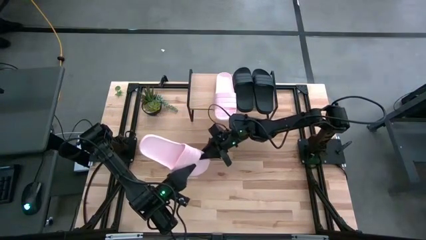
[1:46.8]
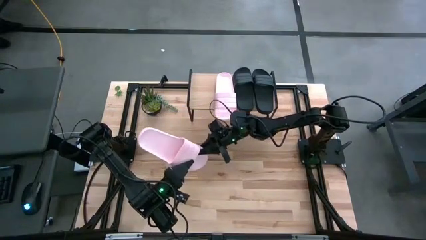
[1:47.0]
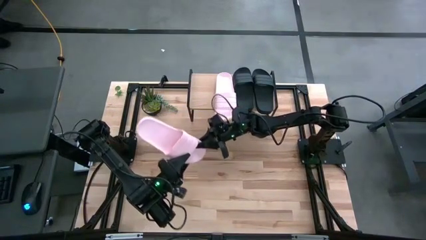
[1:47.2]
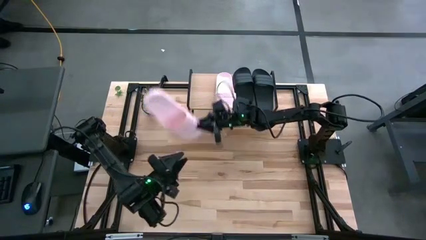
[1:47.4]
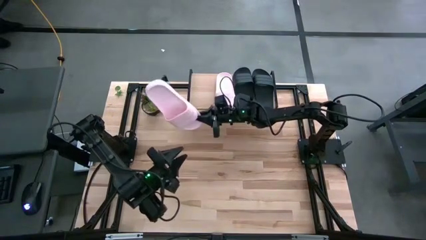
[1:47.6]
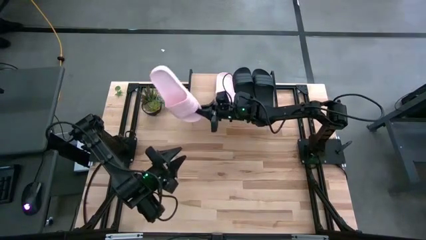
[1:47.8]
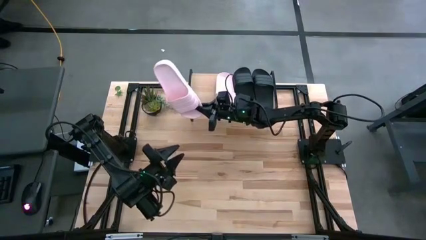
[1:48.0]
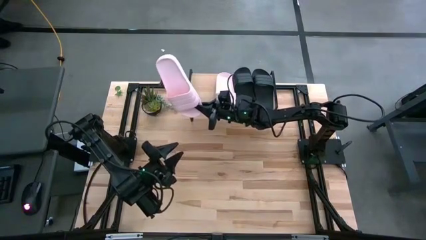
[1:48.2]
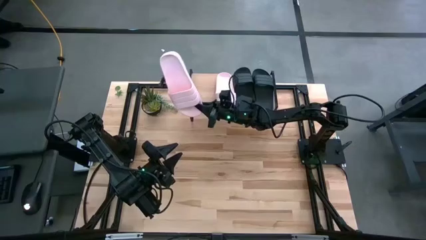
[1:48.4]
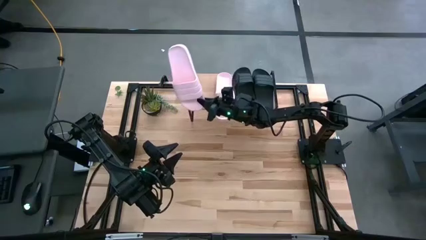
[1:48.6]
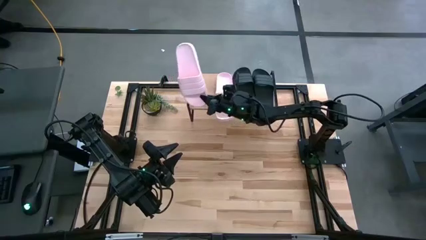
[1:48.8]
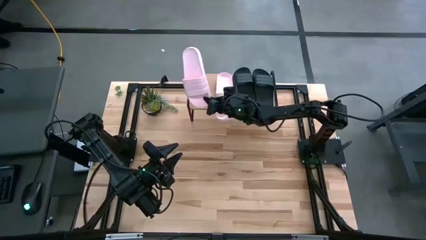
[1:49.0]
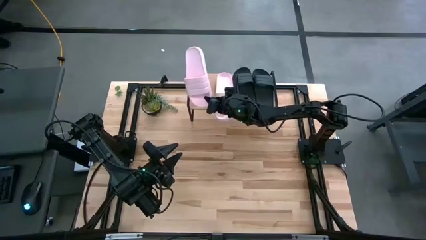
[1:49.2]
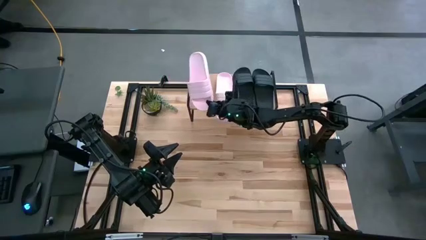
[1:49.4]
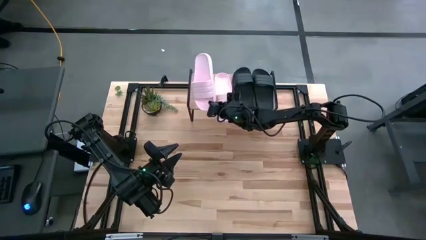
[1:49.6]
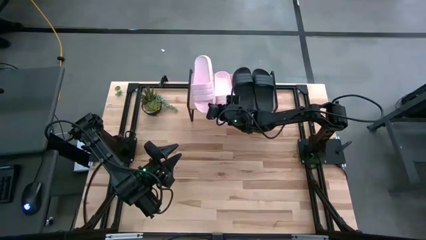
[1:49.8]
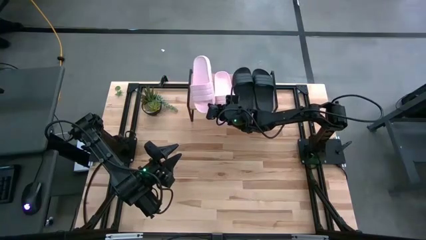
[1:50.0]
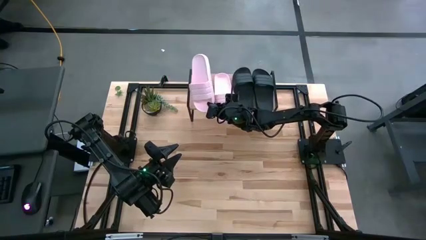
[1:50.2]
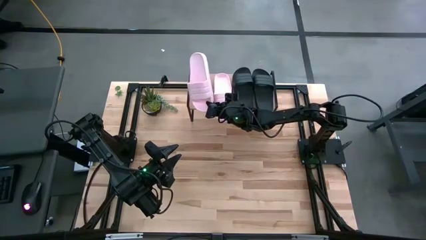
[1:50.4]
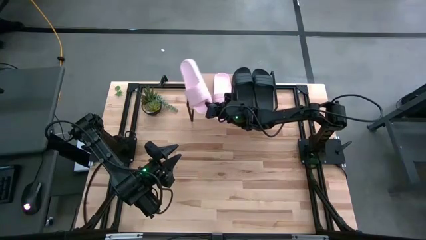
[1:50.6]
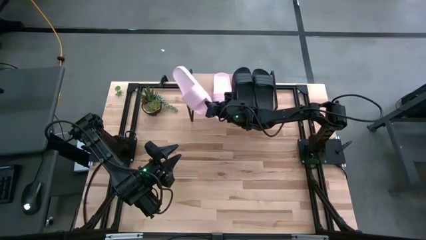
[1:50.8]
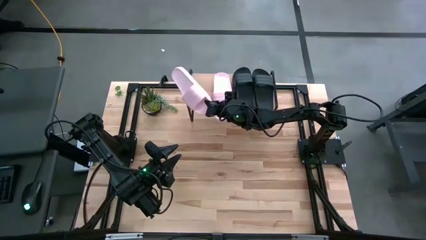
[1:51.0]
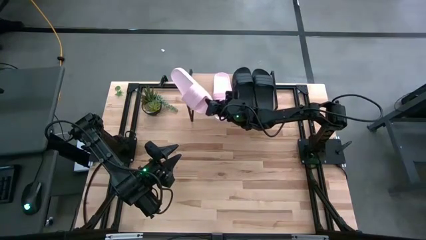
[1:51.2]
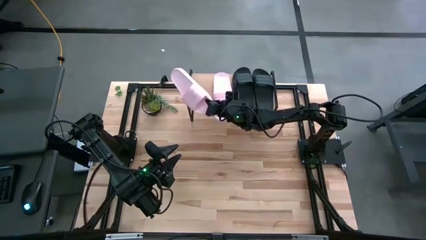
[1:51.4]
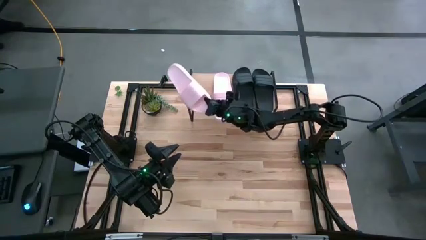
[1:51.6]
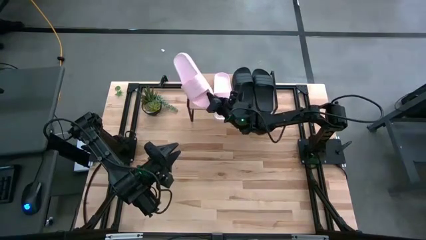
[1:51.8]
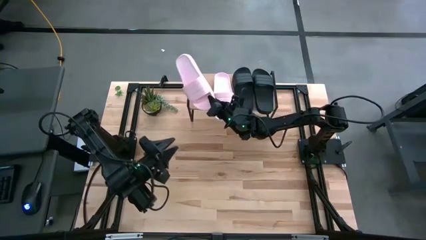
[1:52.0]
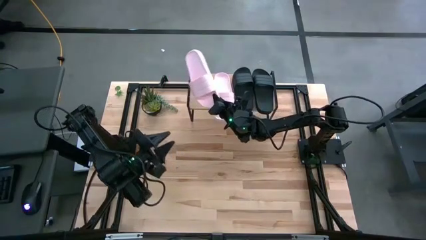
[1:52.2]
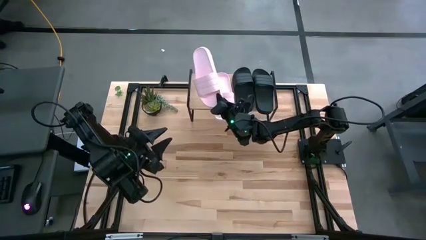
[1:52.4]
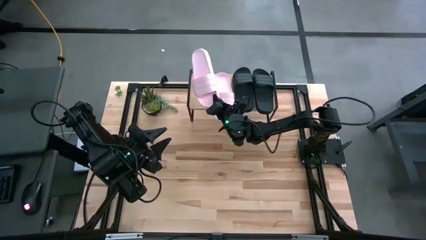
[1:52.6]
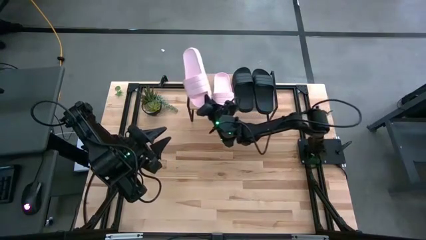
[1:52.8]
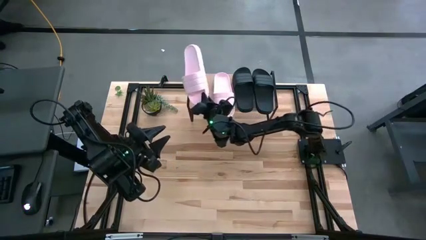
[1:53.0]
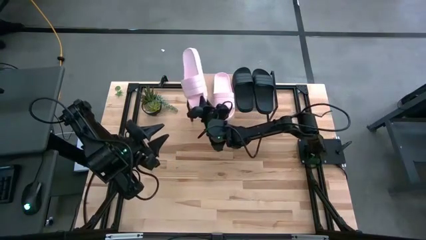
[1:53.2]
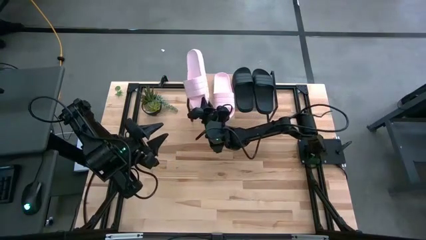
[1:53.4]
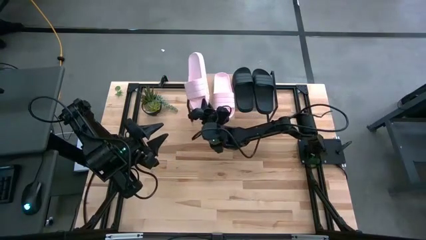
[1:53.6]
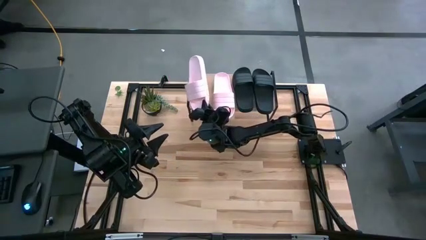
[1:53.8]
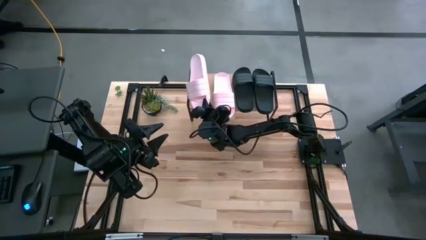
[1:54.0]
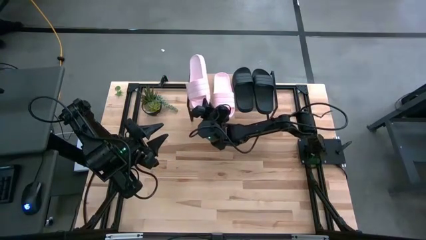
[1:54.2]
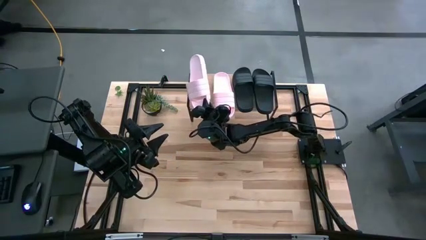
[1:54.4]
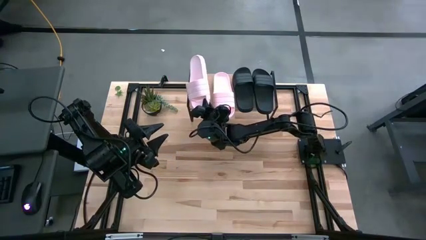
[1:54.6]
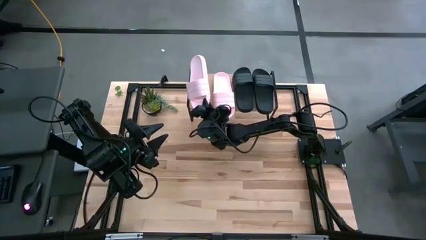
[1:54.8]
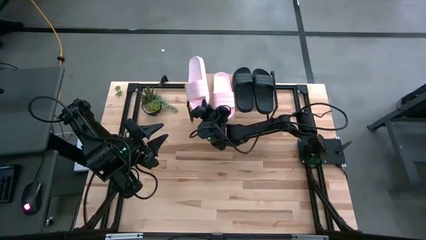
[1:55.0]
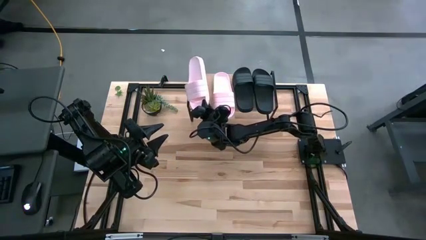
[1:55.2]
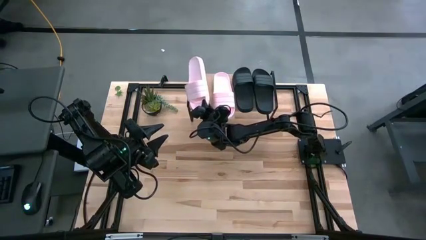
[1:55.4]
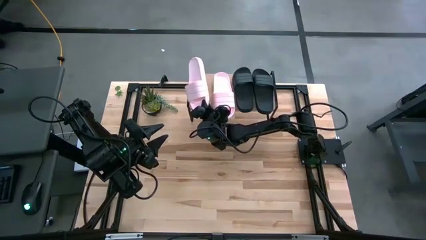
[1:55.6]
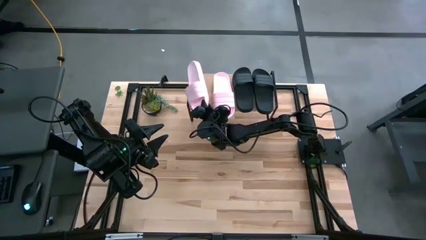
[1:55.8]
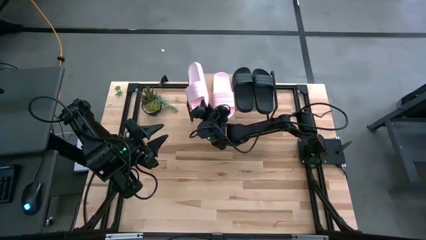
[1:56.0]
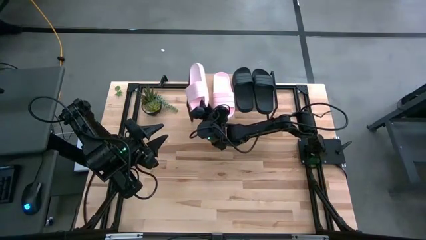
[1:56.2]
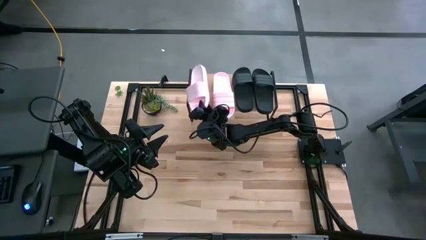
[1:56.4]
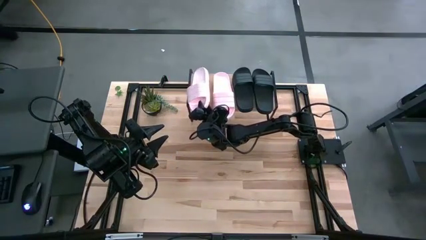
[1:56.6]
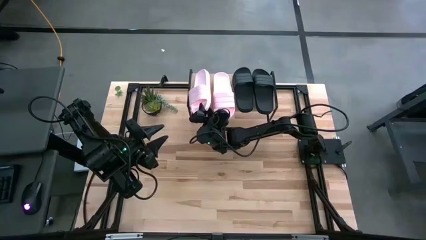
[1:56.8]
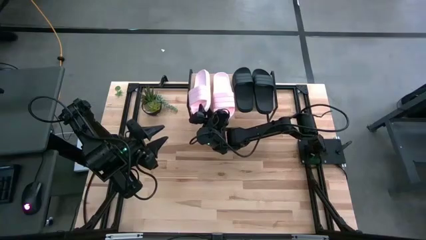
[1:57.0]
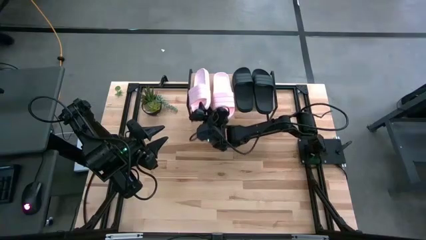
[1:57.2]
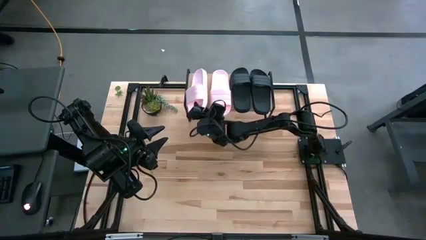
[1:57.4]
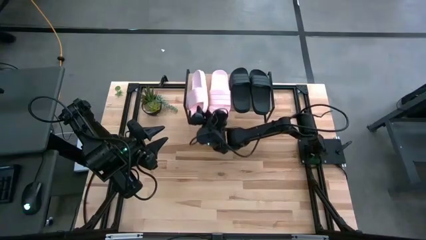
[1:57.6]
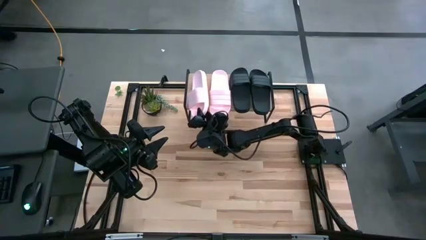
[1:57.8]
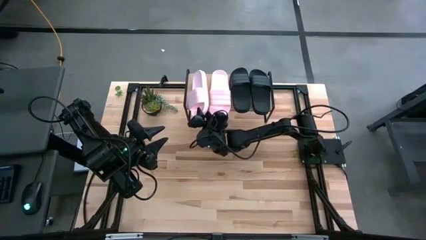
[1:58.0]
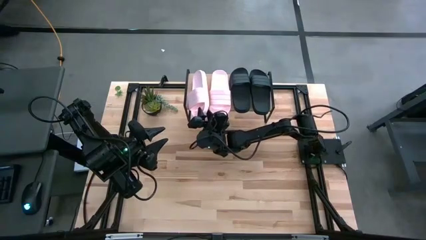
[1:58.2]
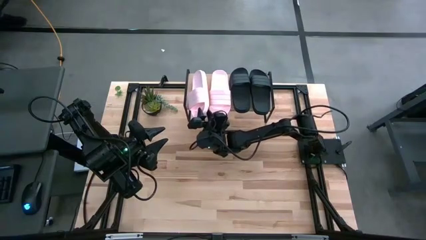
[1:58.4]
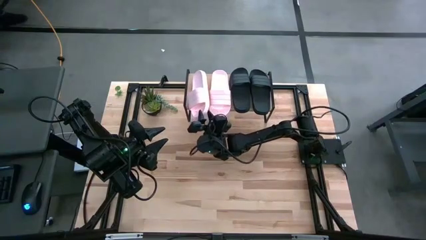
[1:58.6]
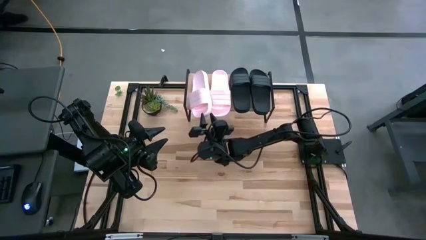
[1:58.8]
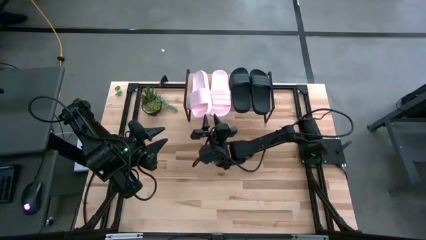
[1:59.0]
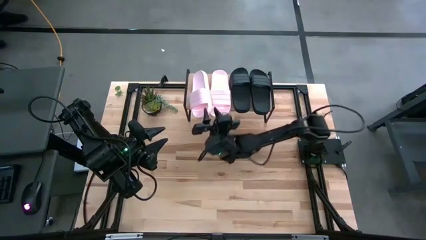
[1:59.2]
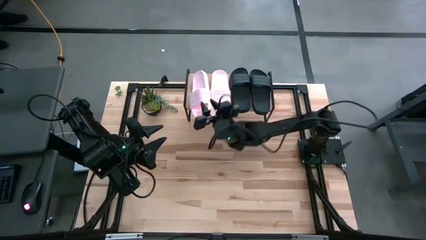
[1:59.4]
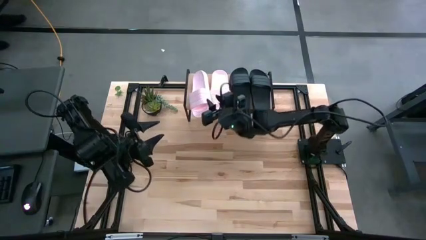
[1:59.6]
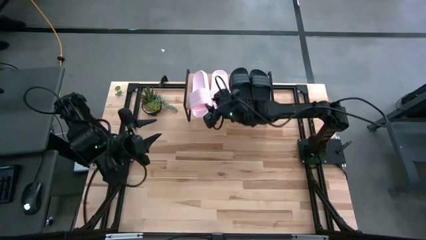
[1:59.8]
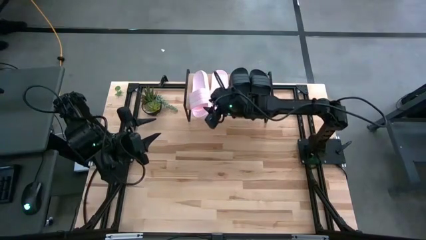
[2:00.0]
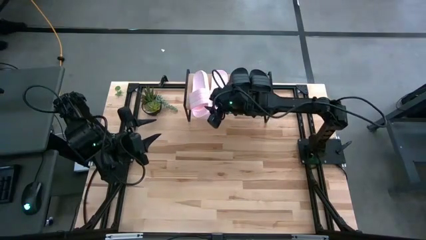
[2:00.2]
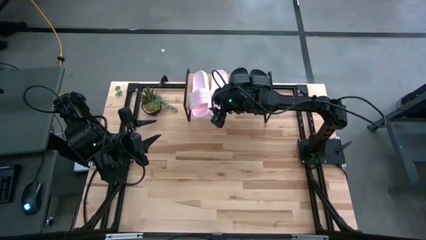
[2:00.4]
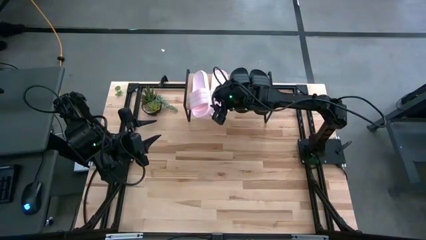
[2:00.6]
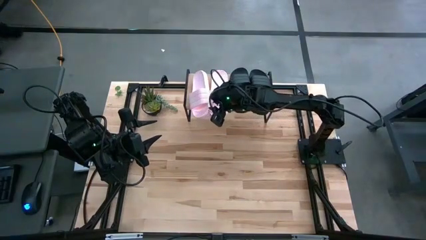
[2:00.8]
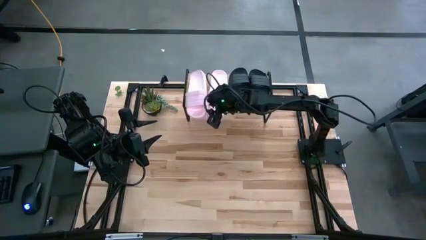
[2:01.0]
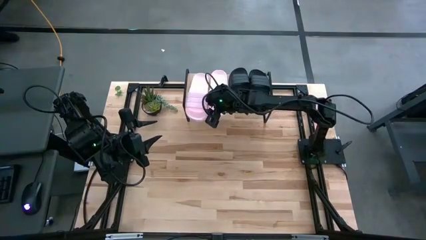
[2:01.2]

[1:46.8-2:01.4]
Task: Pick and place slides into the shelf
Put the pink slipper on the shelf

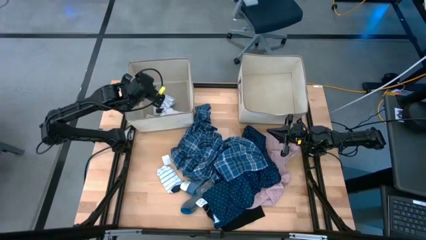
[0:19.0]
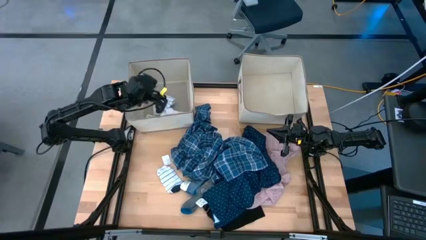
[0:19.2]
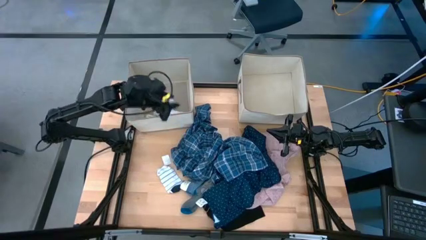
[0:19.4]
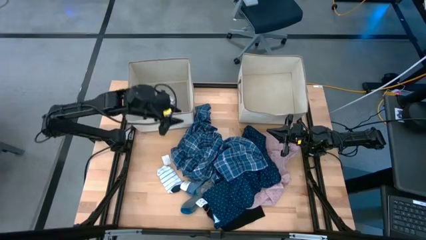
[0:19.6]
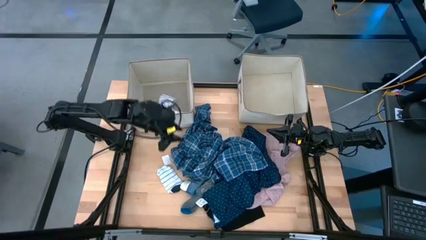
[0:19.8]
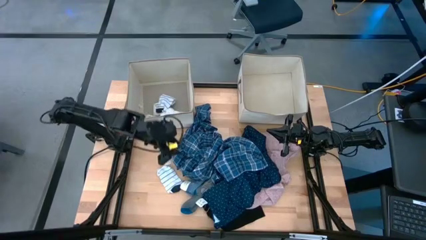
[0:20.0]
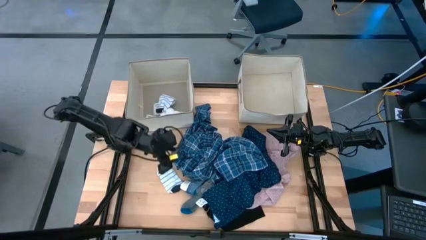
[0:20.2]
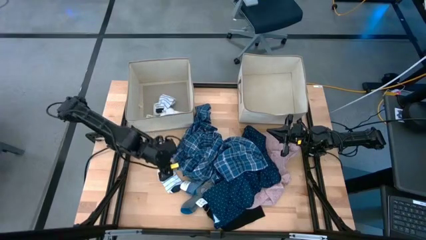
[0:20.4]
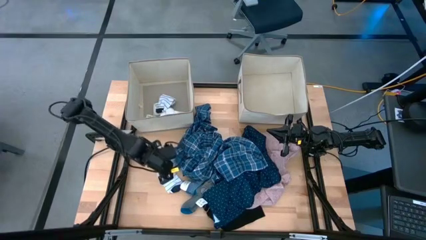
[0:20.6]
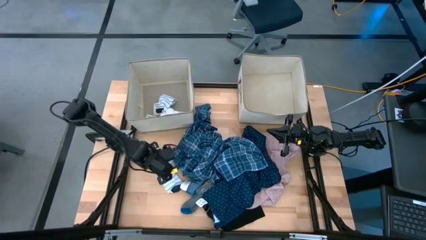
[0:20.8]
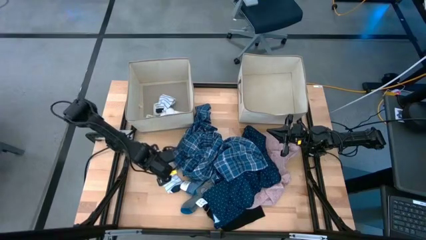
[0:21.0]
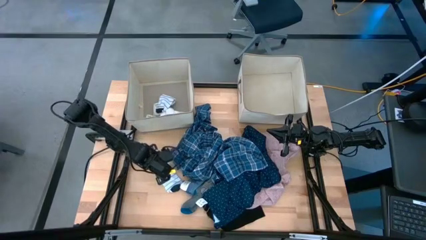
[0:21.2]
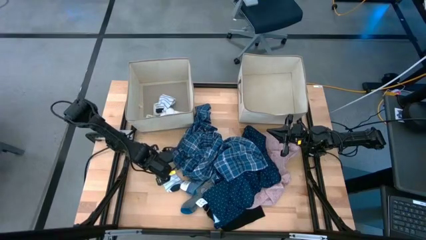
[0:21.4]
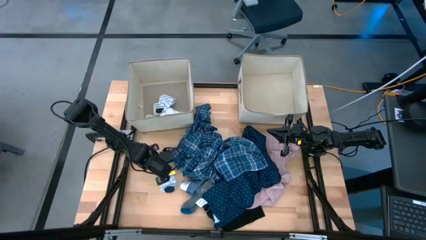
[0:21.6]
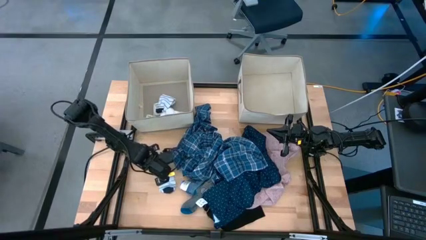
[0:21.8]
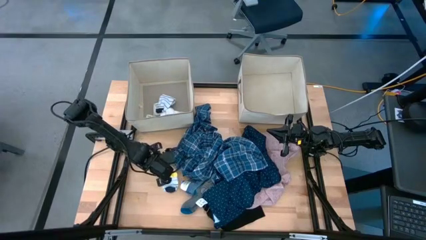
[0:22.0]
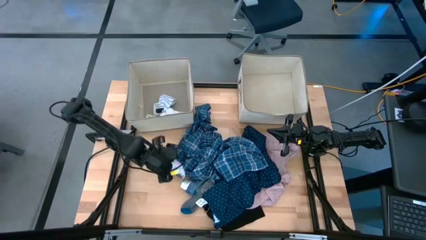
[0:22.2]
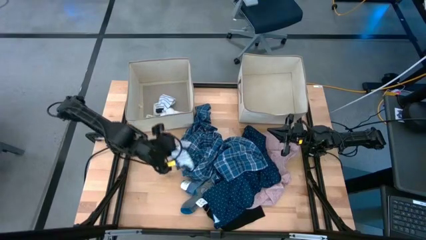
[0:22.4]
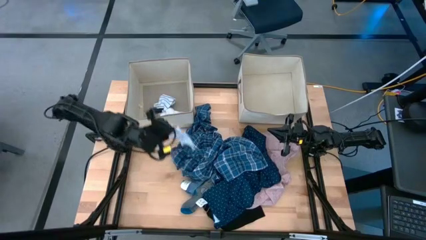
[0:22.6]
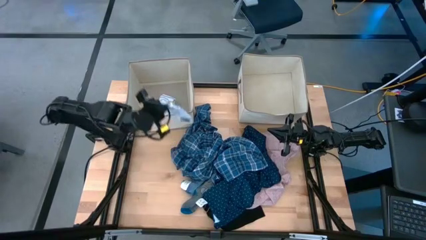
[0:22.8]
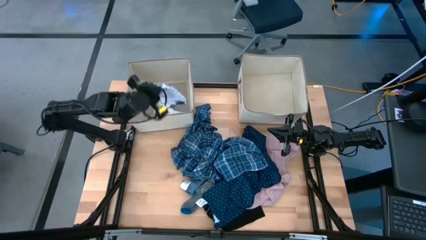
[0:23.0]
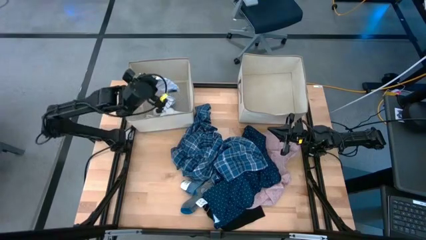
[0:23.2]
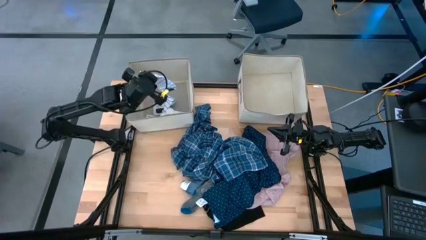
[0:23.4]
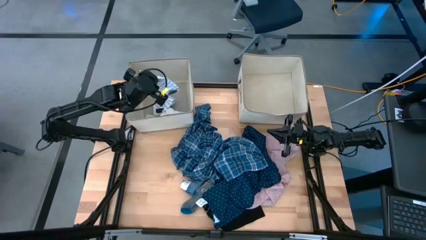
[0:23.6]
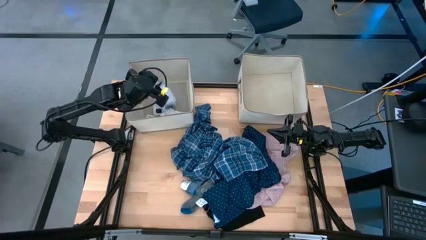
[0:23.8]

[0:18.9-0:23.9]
Task: Sort clothes
Put the white patterned sock into the left laundry bin
